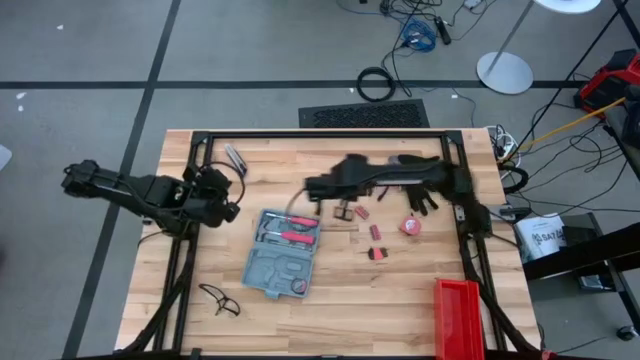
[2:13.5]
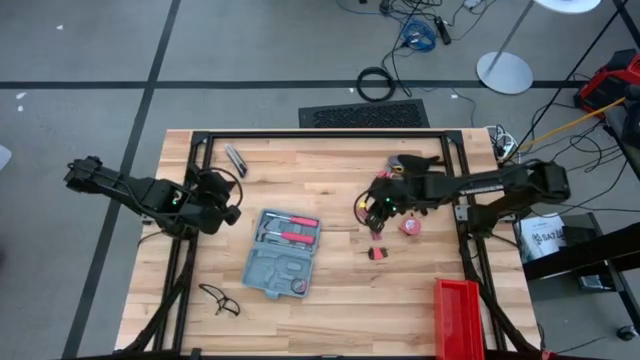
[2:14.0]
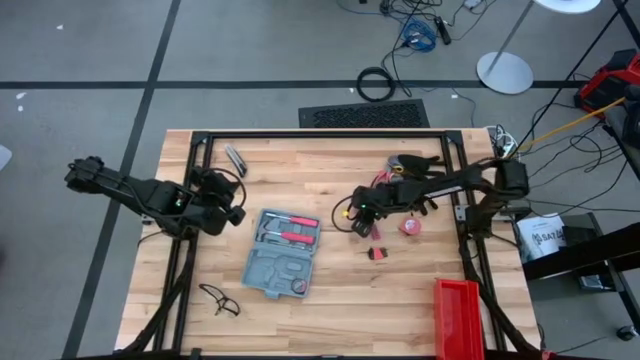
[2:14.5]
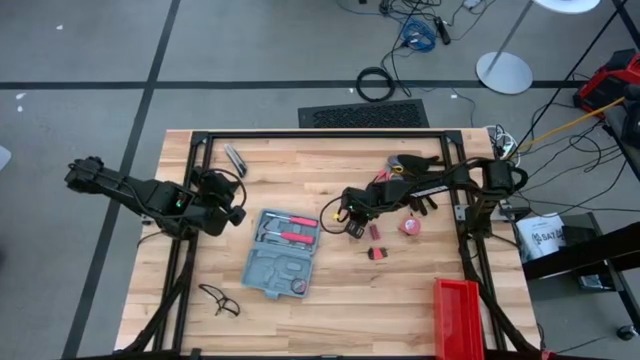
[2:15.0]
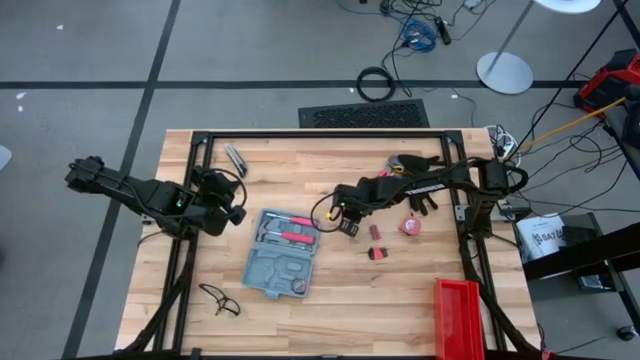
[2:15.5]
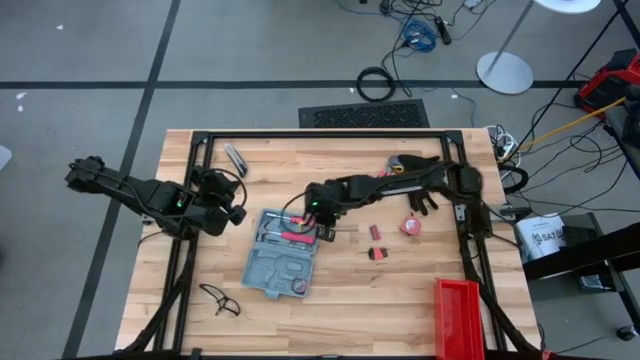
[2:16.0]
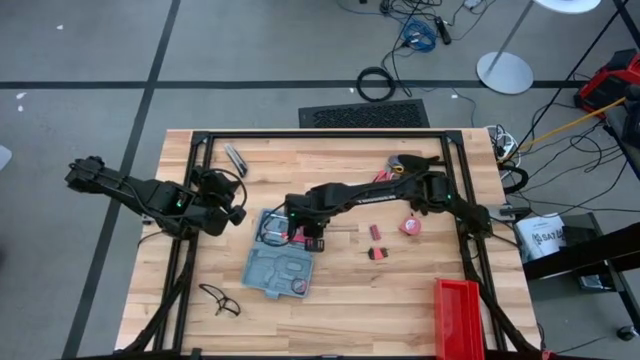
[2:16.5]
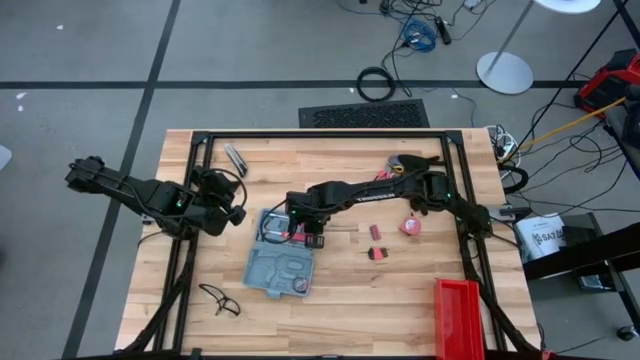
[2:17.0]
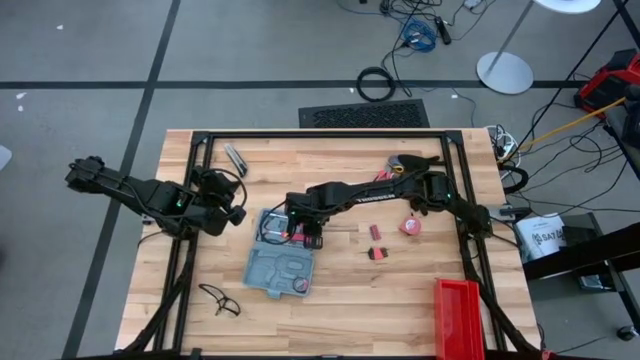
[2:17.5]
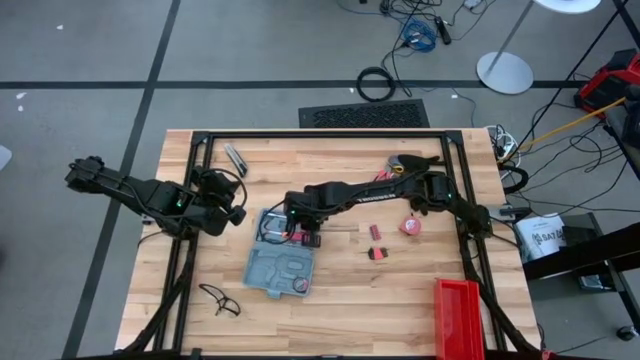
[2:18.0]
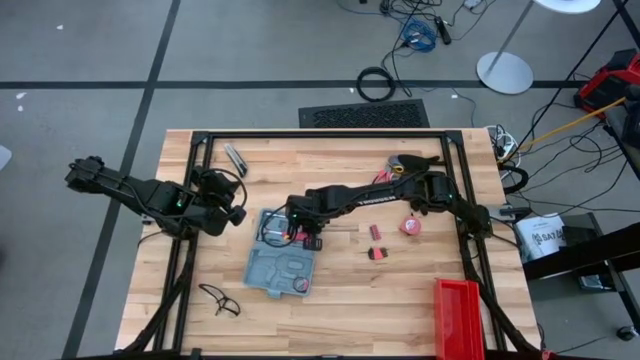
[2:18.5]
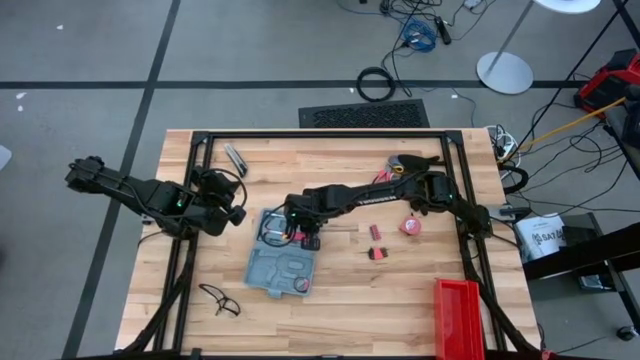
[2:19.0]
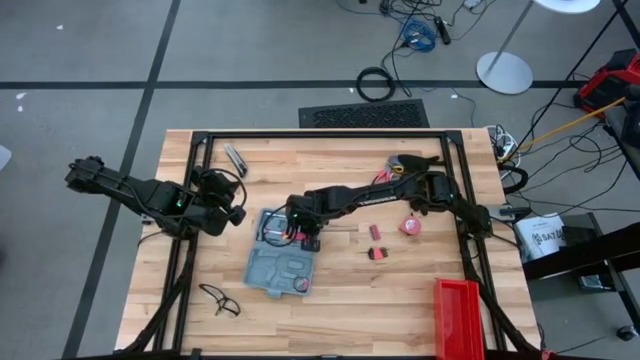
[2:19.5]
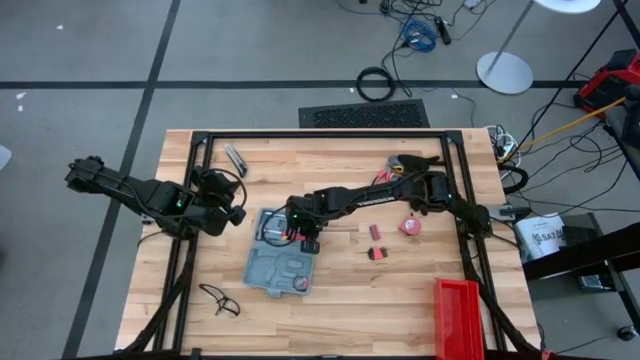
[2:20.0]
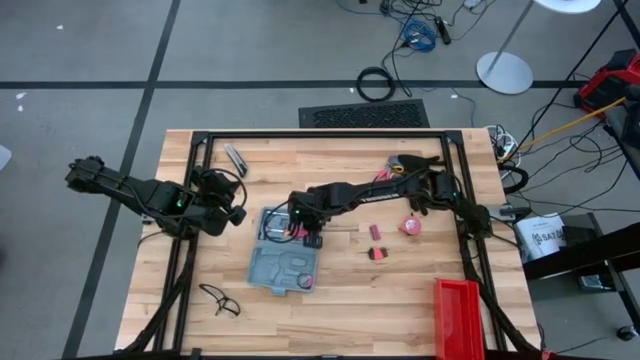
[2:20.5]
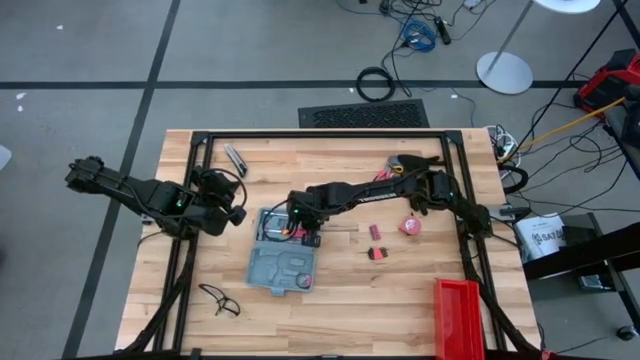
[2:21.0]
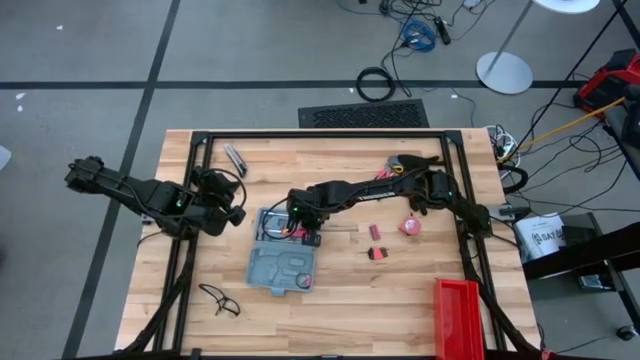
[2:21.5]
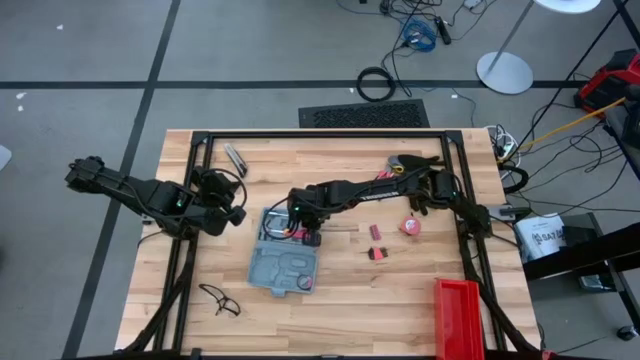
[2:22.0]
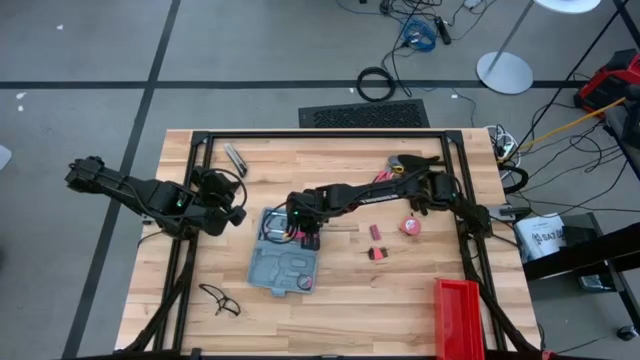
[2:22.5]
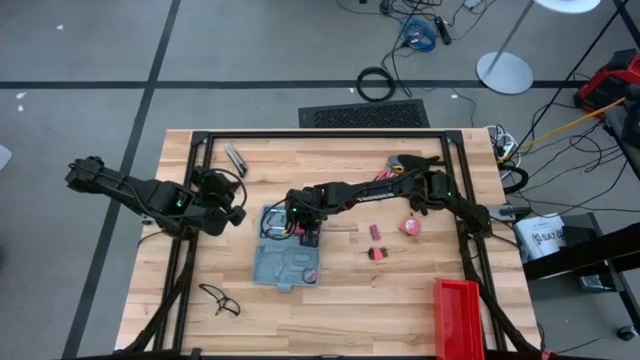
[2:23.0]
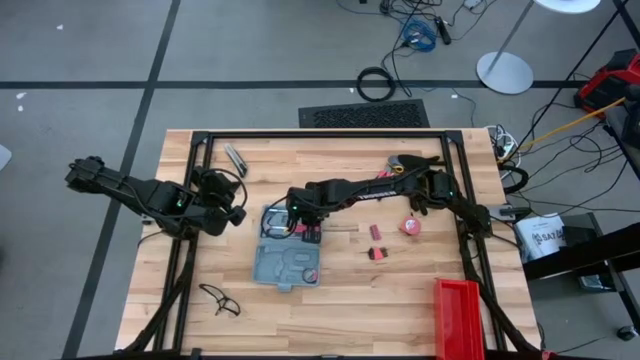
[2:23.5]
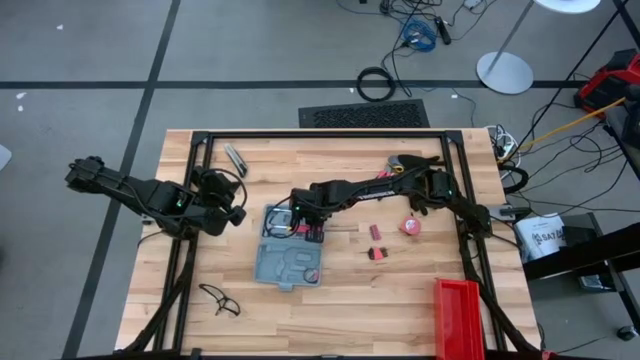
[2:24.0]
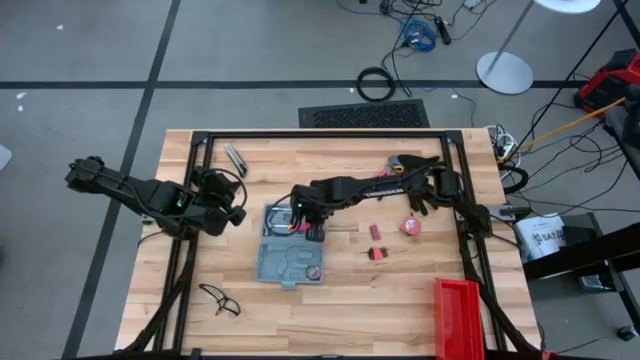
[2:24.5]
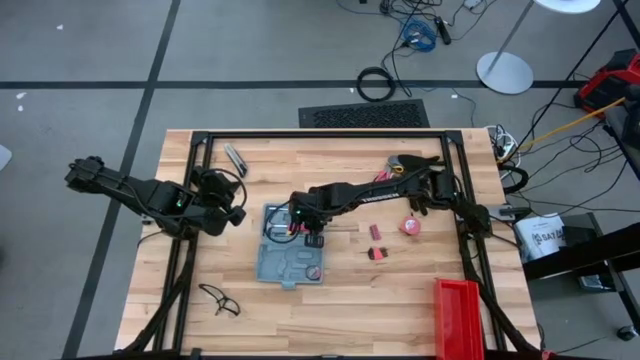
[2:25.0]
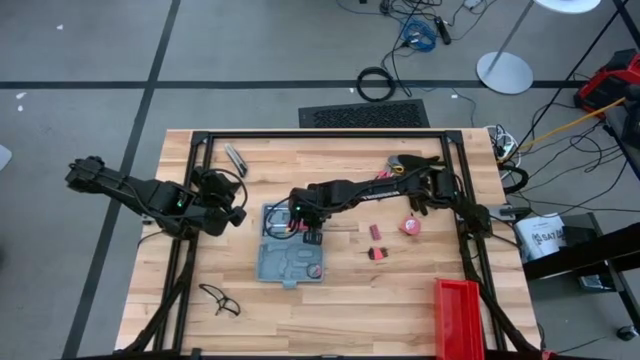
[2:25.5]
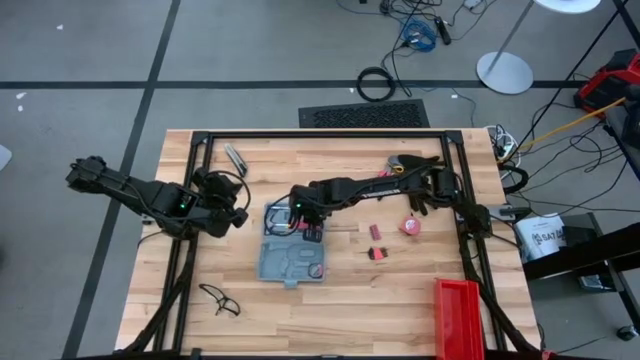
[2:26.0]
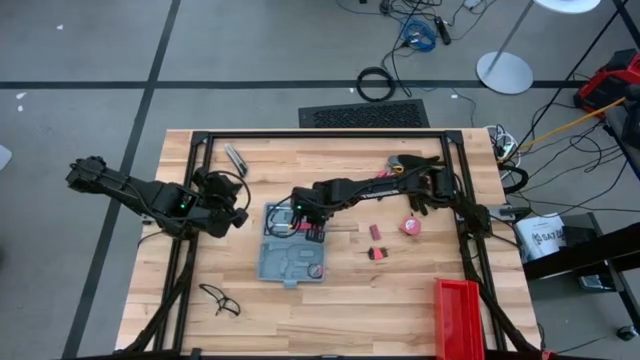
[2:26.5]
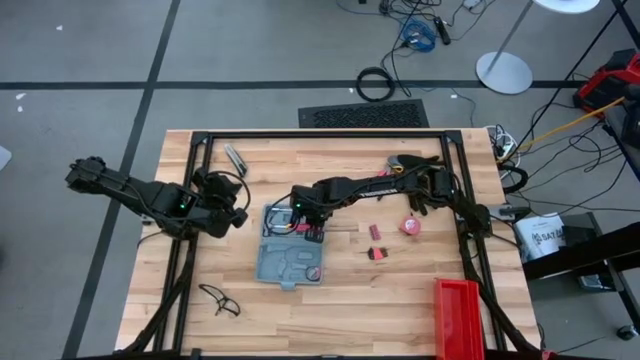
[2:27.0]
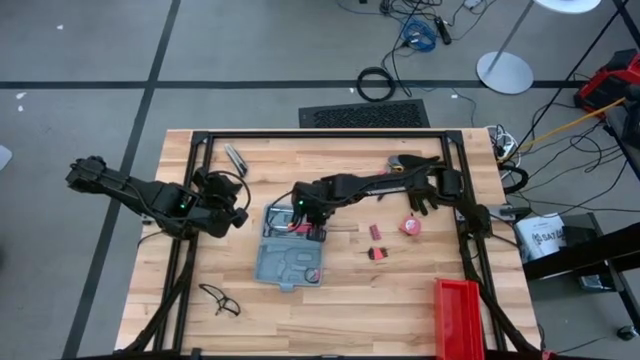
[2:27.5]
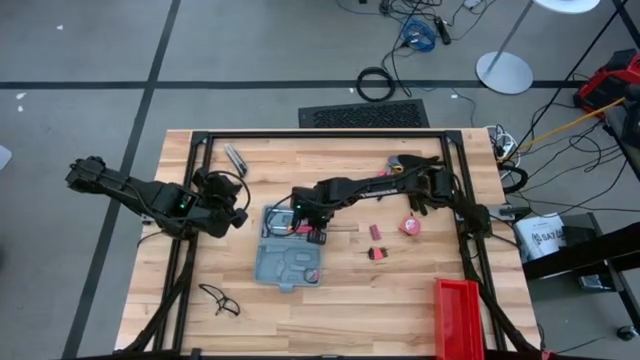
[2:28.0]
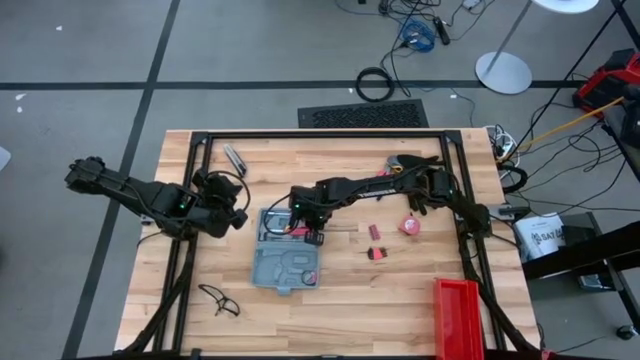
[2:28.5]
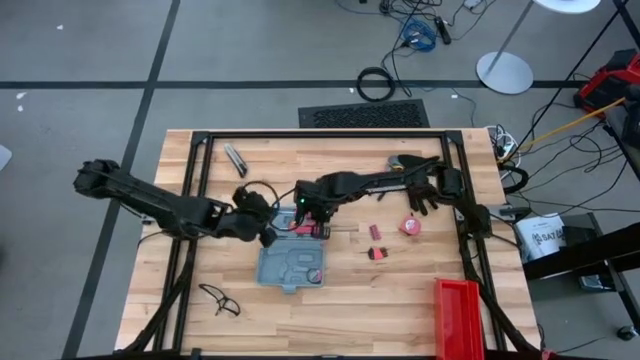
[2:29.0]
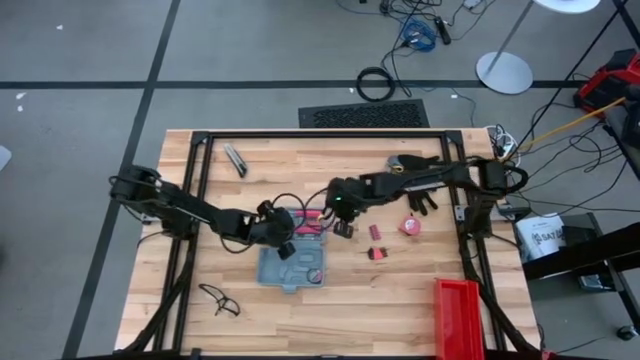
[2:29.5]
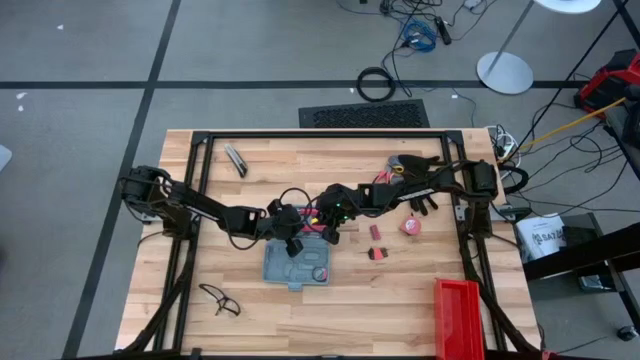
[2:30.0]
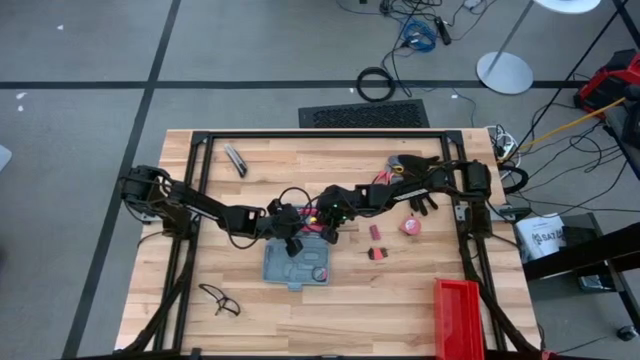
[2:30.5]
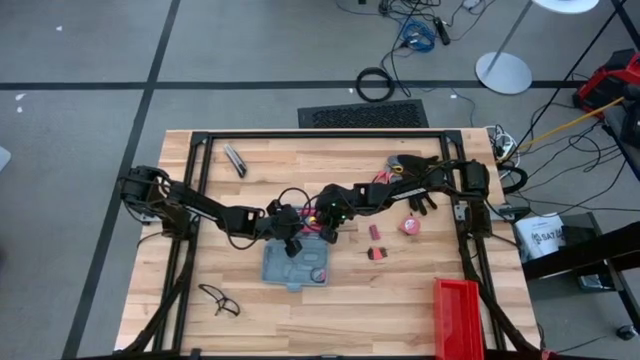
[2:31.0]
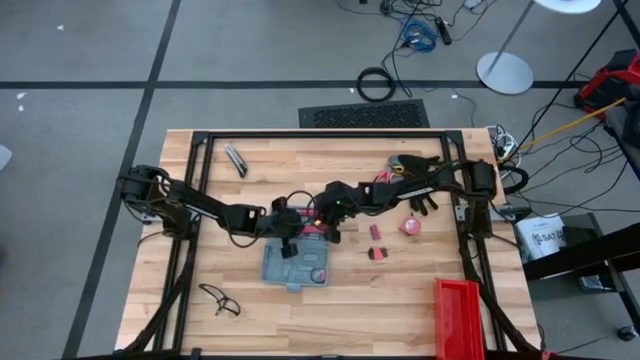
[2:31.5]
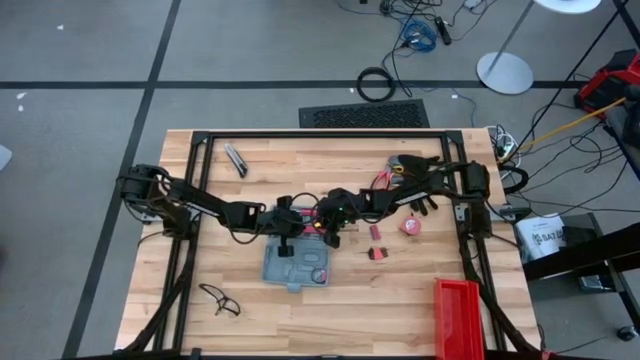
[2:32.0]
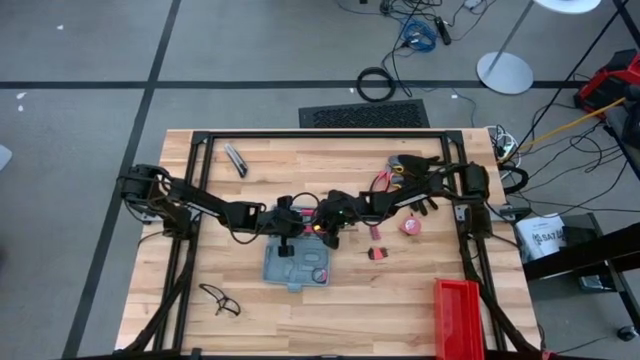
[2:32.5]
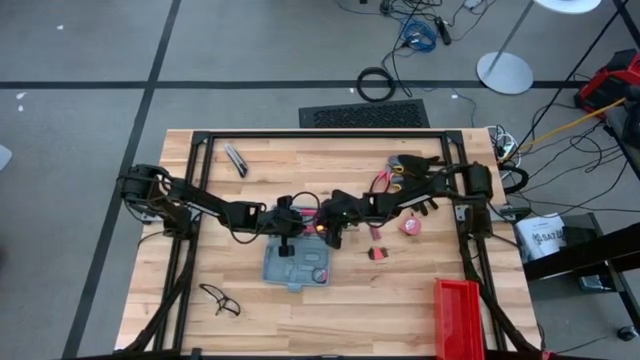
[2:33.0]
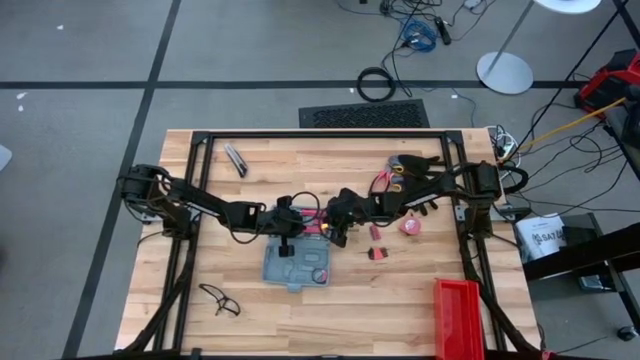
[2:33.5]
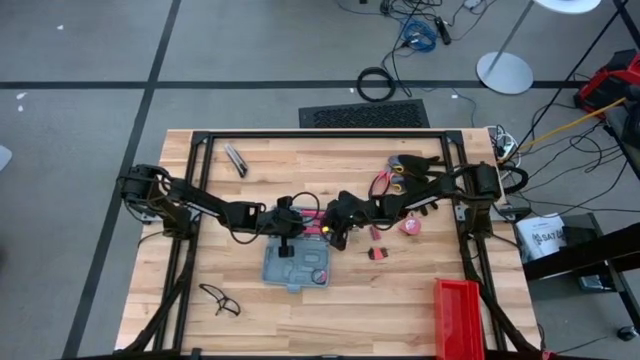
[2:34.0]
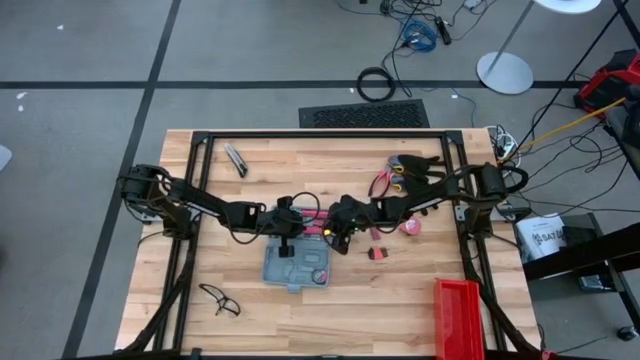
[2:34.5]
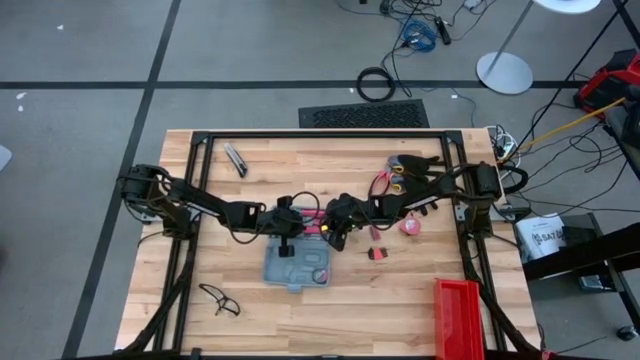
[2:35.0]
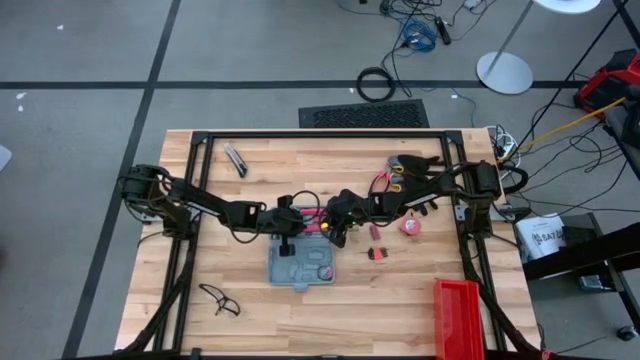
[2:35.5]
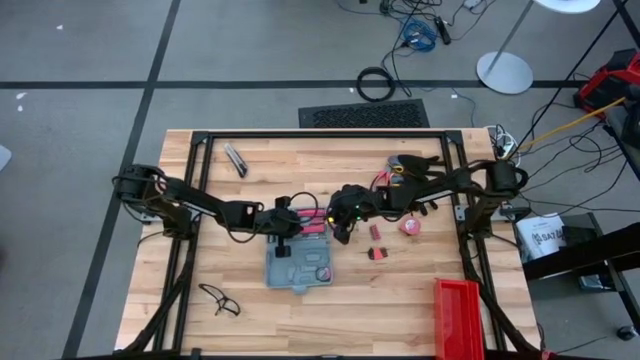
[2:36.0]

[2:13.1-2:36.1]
Task: prefit tool cases
Put the top pink terminal block into the gray prefit tool case
